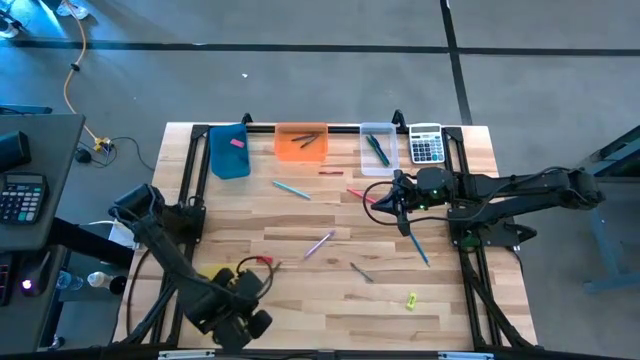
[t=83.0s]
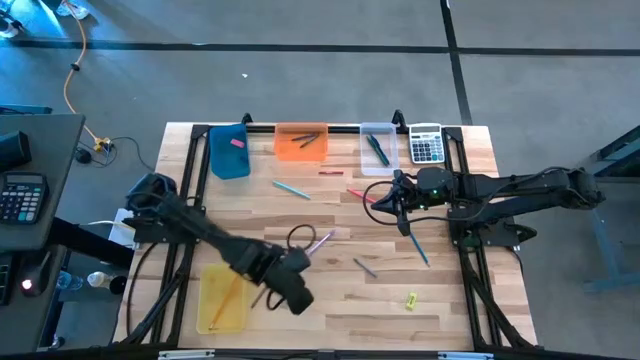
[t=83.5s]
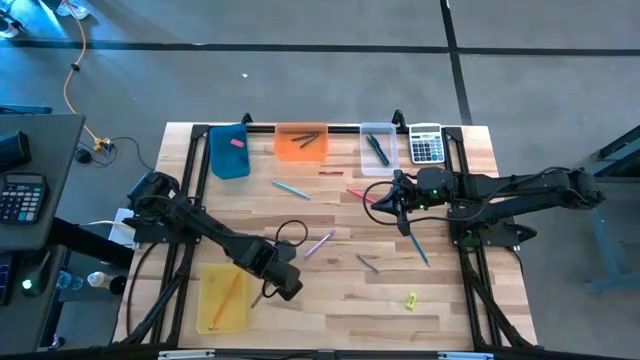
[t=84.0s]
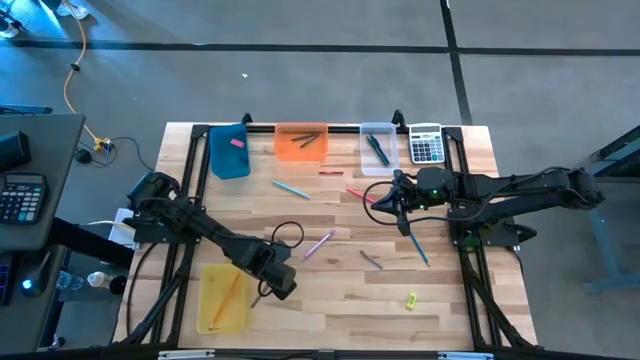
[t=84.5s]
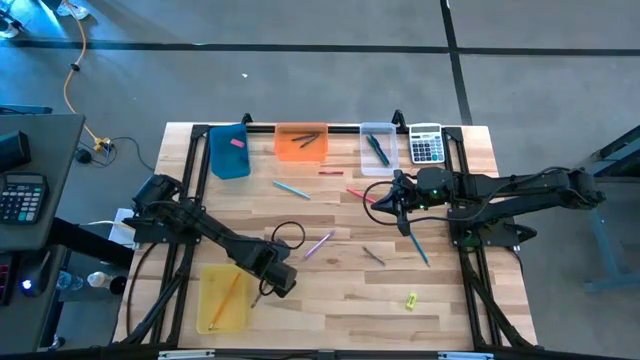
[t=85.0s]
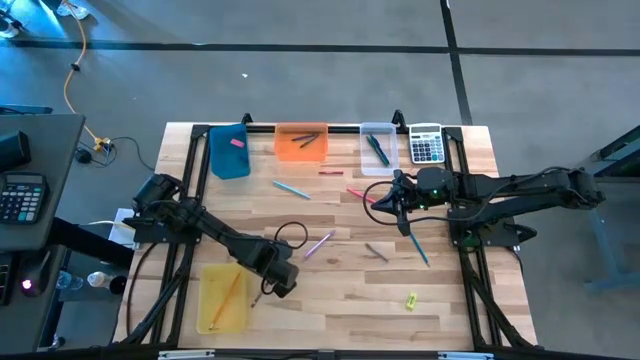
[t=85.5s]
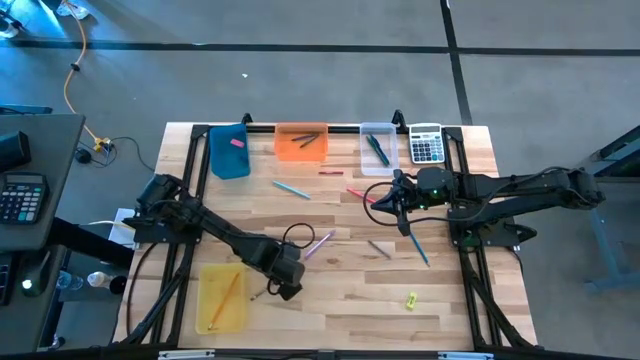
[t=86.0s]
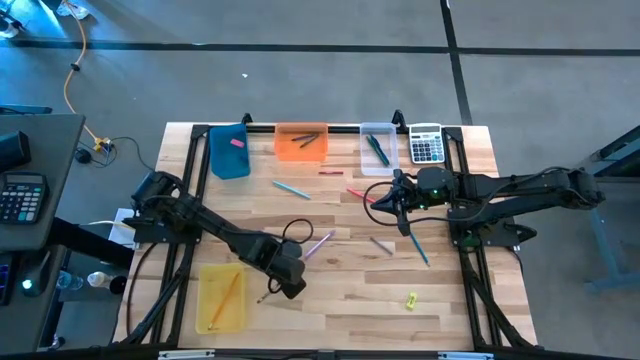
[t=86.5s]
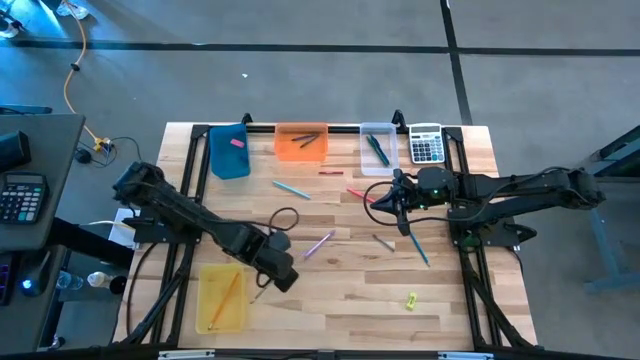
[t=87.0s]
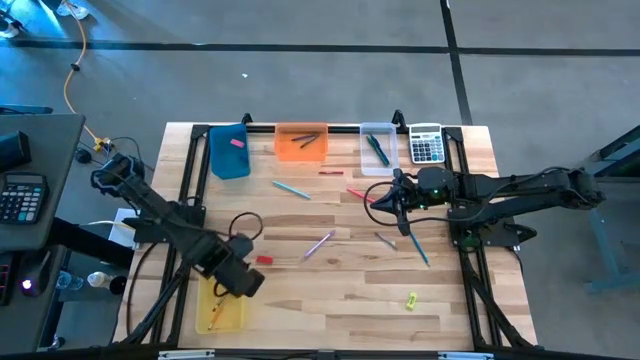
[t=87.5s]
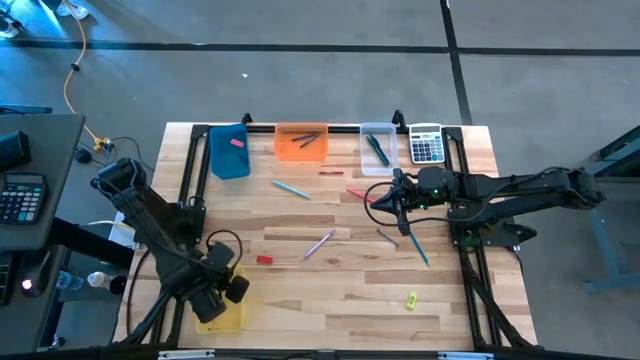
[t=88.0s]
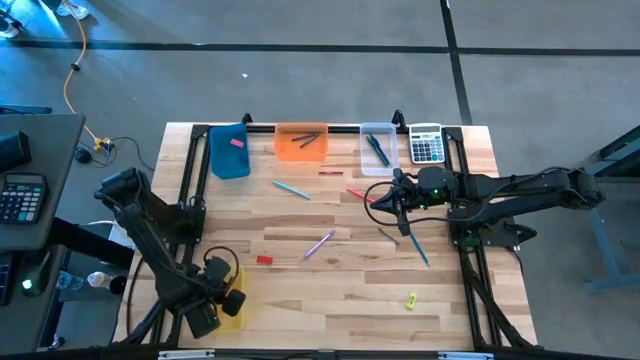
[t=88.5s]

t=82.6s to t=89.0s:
Task: Sort crayons/erasers/pens/pencils in bins
Put the blue pencil into the yellow bin

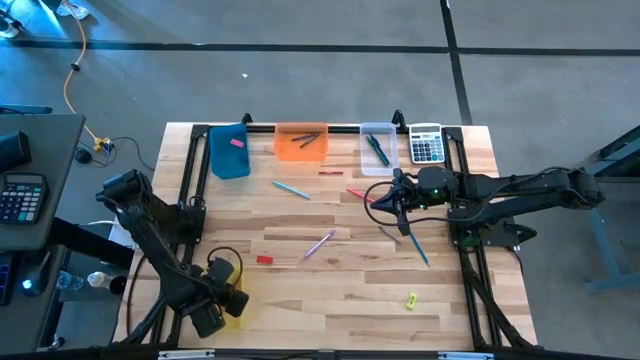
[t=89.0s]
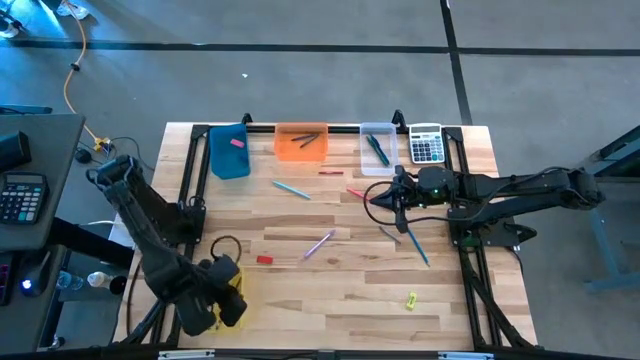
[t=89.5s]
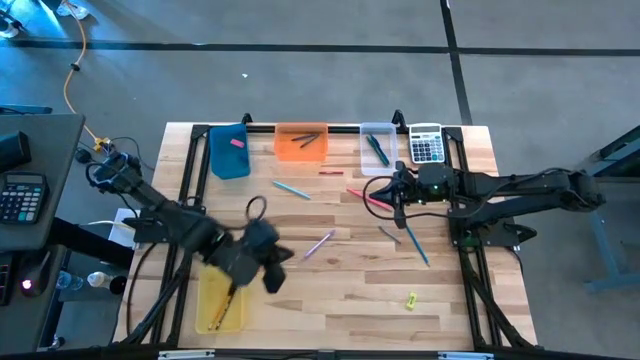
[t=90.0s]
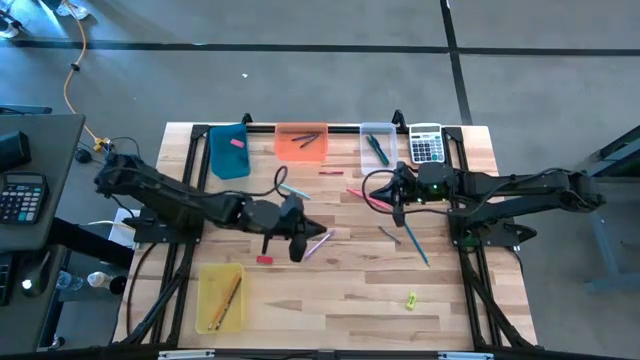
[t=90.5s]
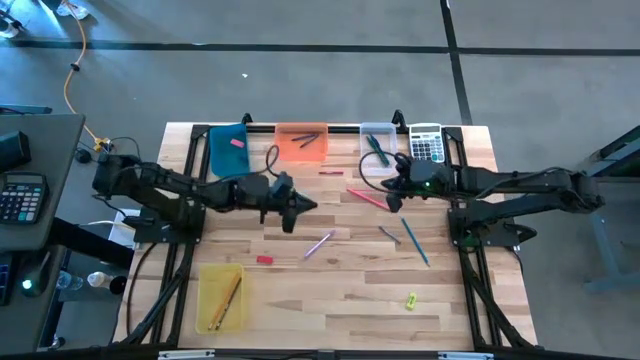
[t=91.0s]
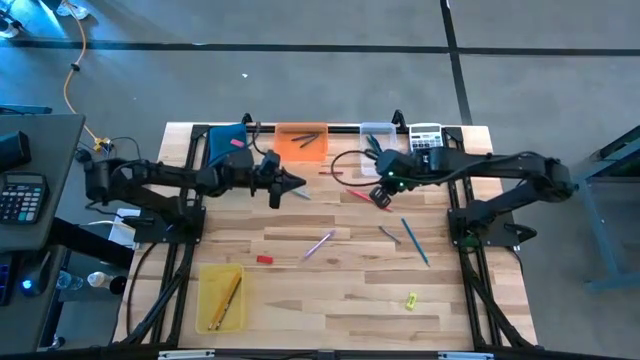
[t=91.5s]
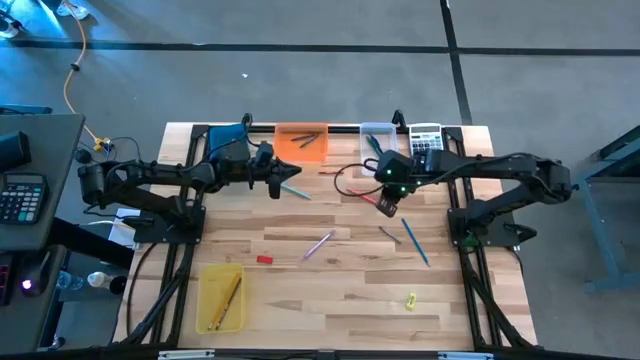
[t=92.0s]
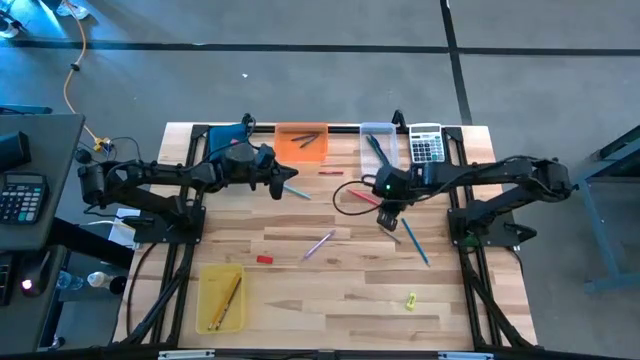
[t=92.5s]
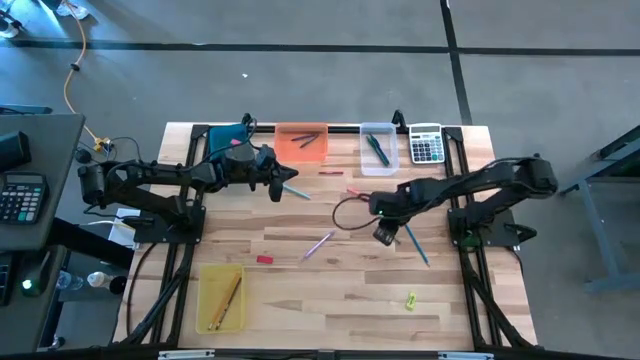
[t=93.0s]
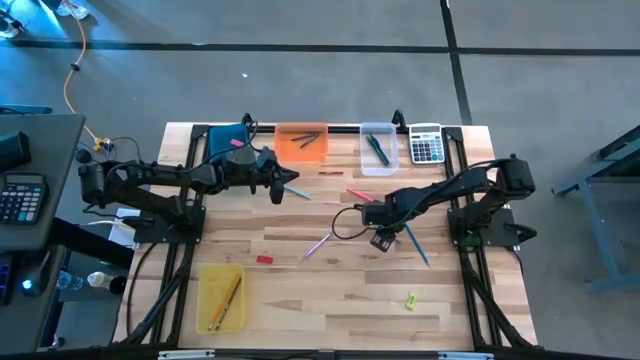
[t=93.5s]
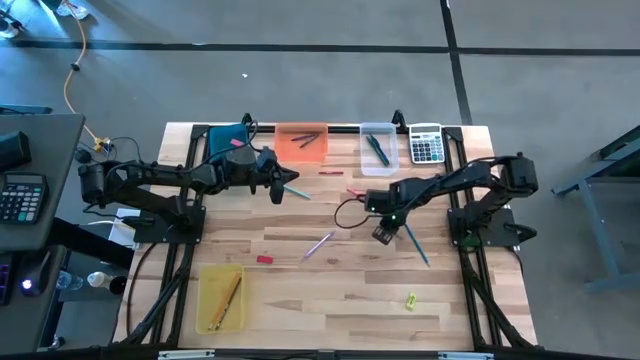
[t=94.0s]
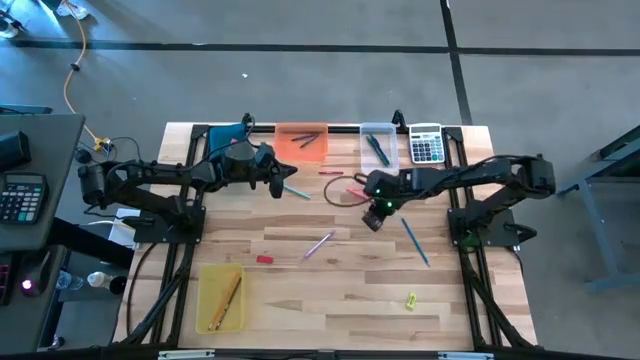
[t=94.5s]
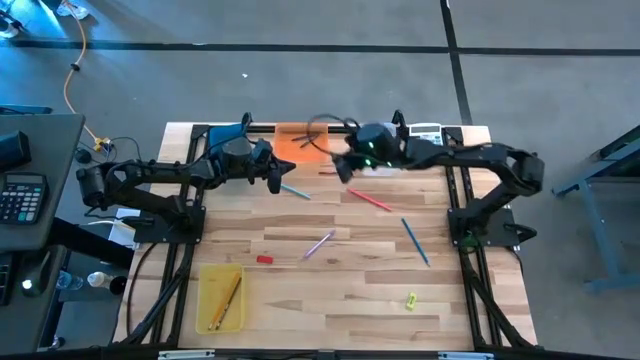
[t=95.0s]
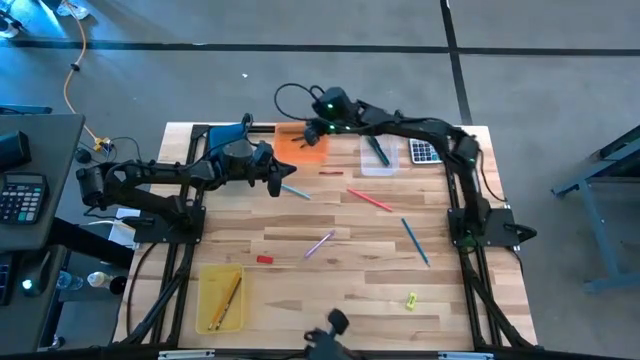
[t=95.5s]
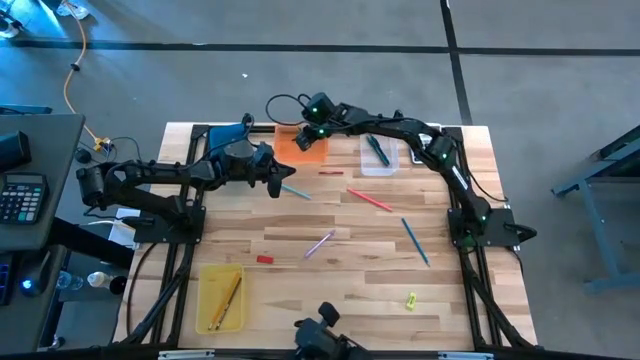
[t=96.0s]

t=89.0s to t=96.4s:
Put the gray crayon into the orange bin

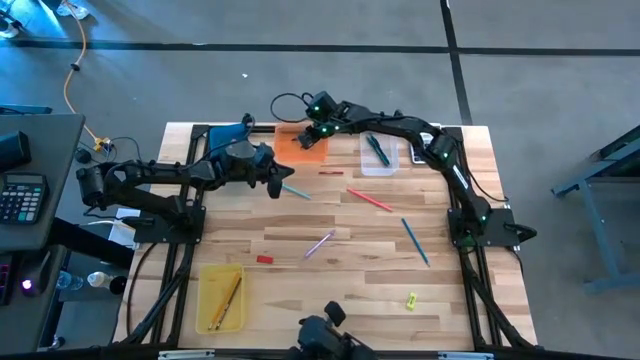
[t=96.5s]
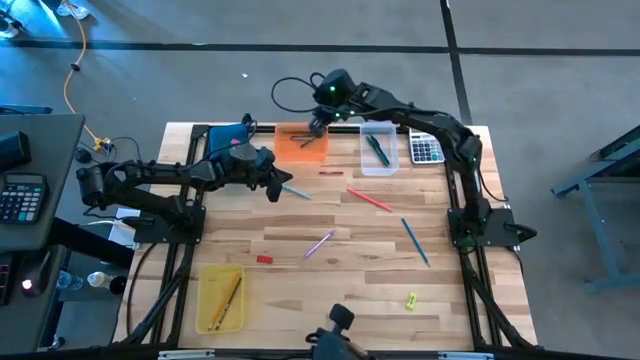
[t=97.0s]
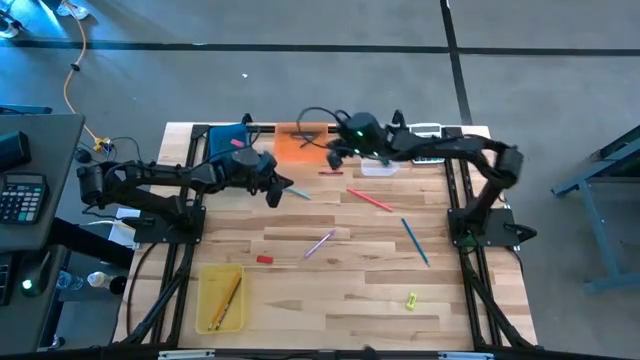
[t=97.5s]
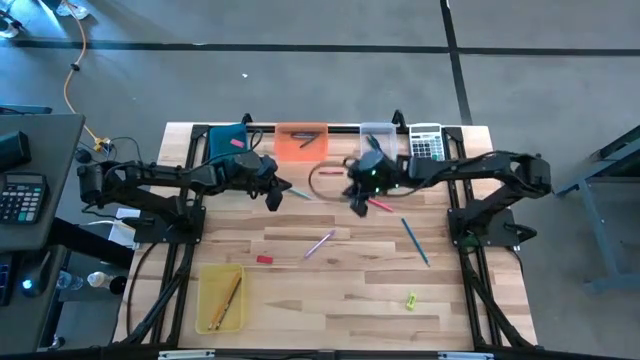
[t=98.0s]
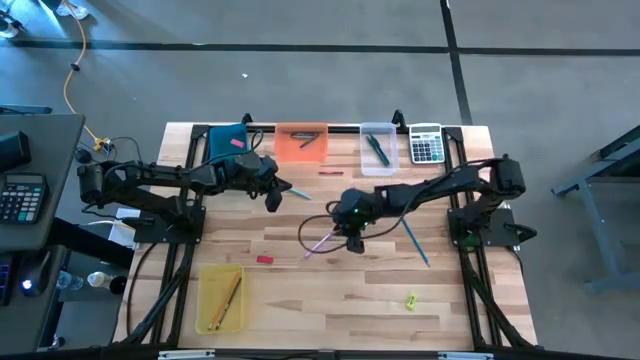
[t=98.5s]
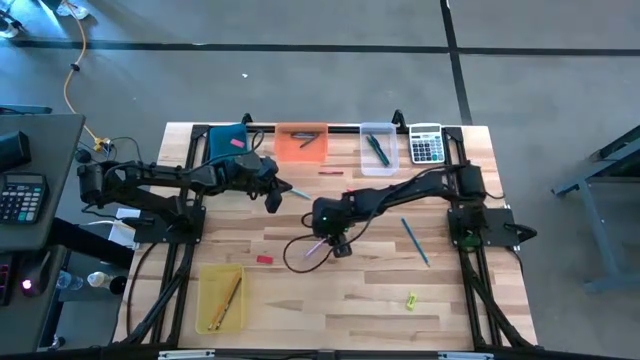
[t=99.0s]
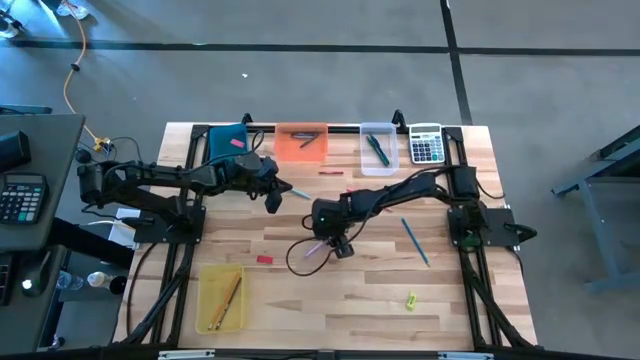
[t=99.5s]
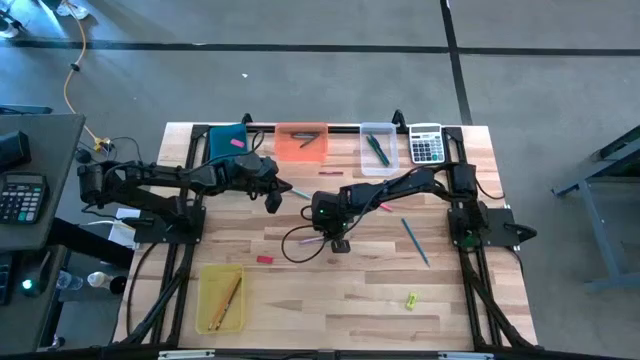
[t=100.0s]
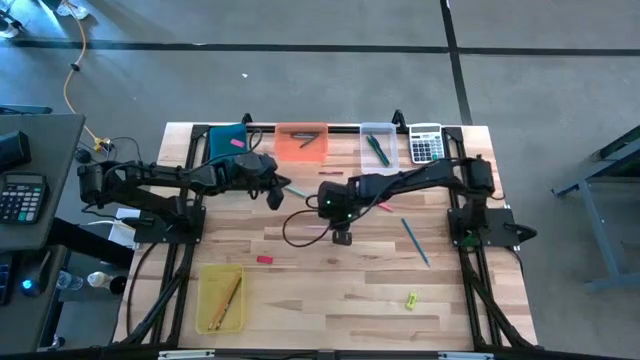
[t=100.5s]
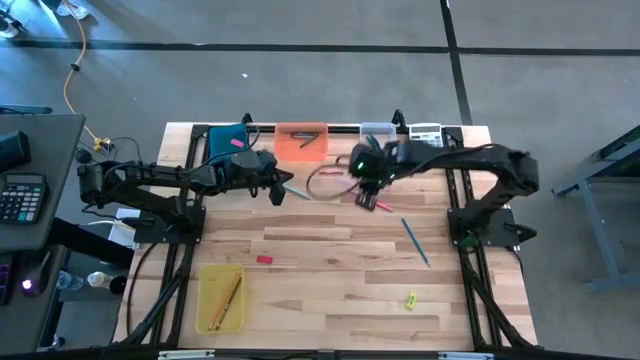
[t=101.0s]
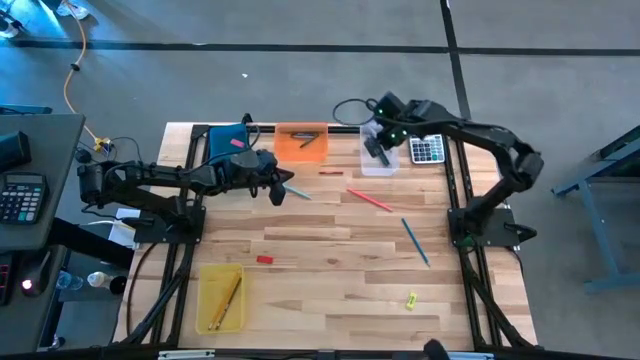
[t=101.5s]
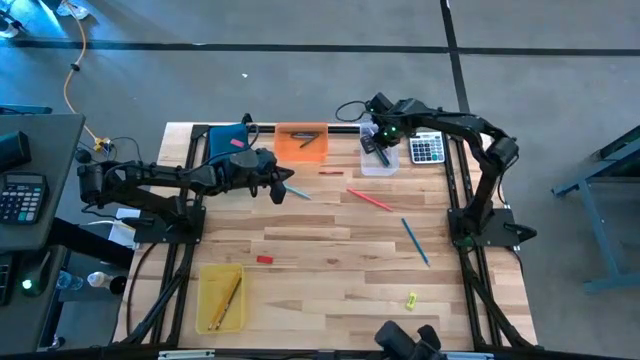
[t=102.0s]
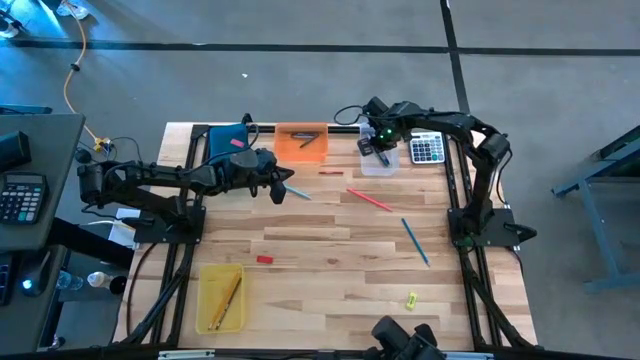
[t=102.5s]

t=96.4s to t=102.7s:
Put the purple pen into the transparent bin
